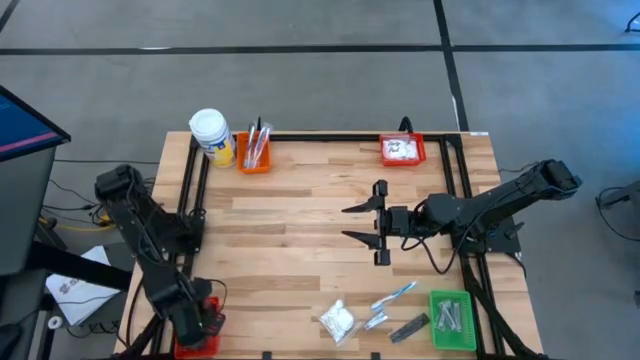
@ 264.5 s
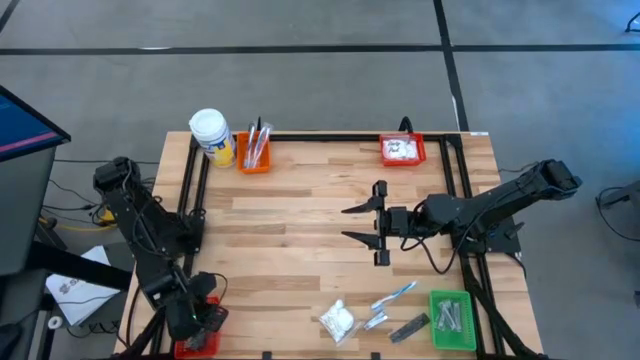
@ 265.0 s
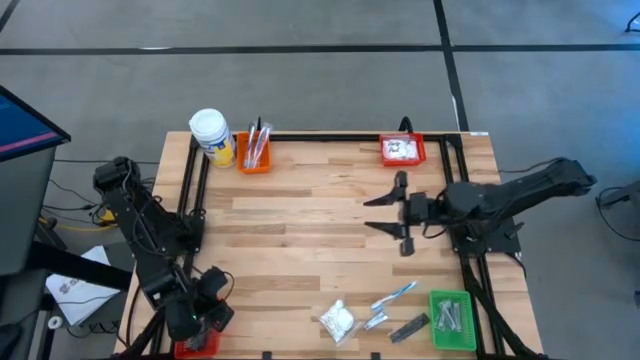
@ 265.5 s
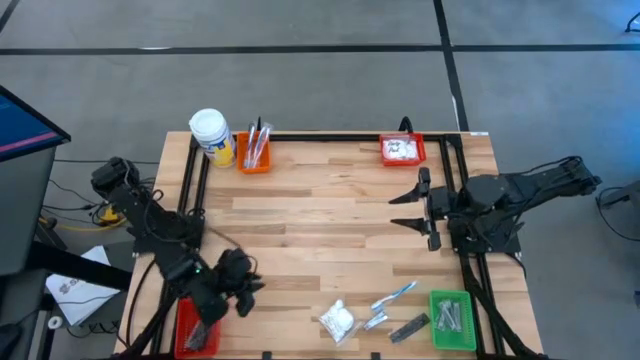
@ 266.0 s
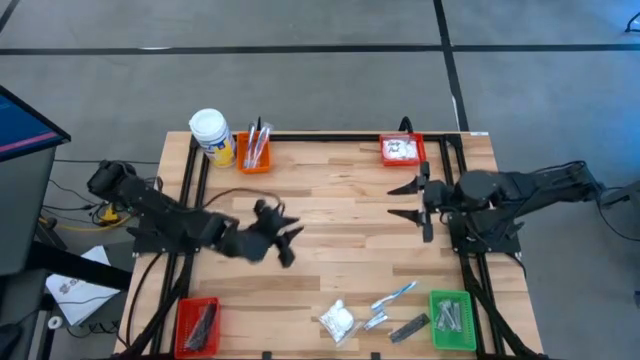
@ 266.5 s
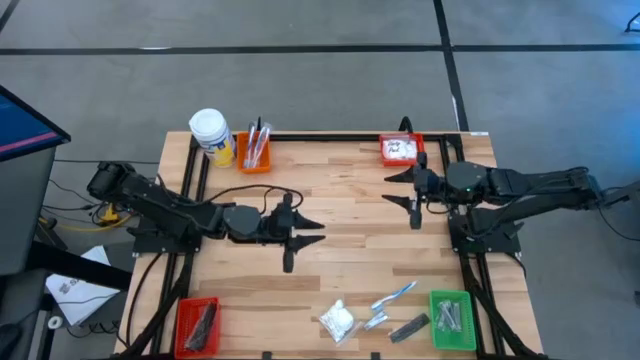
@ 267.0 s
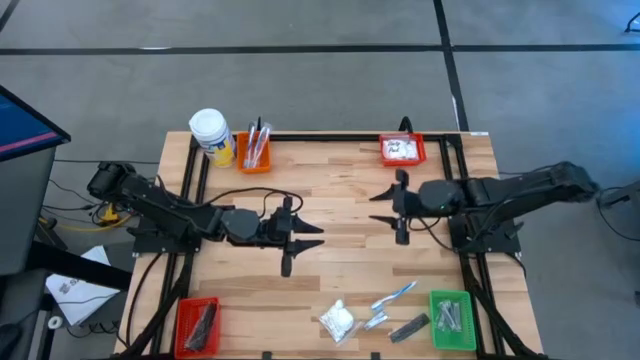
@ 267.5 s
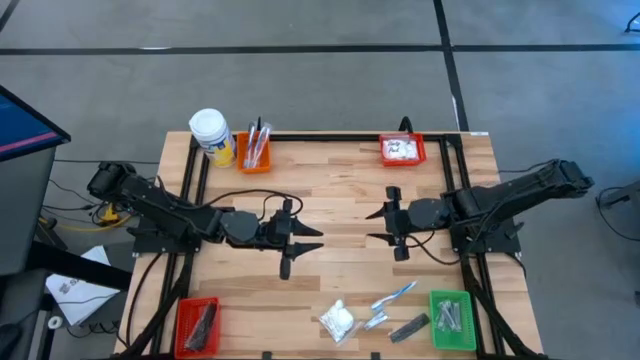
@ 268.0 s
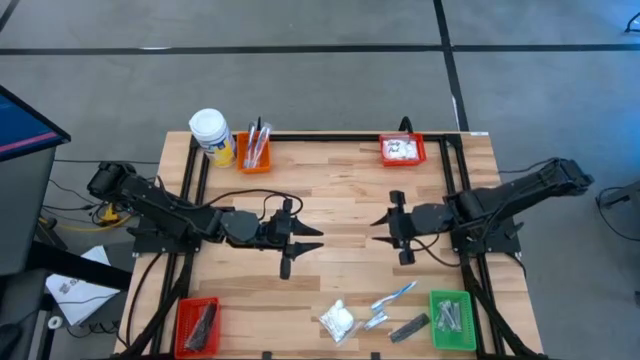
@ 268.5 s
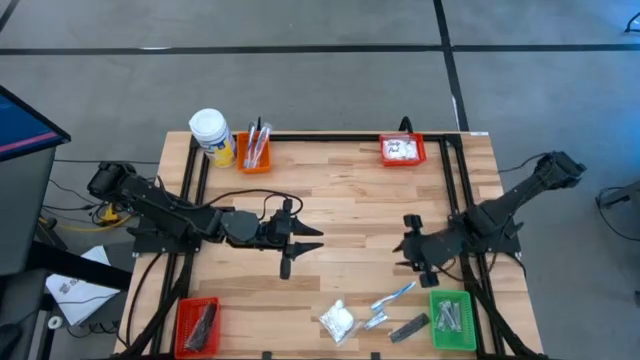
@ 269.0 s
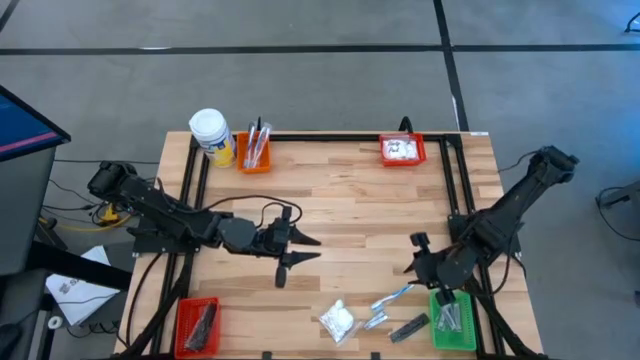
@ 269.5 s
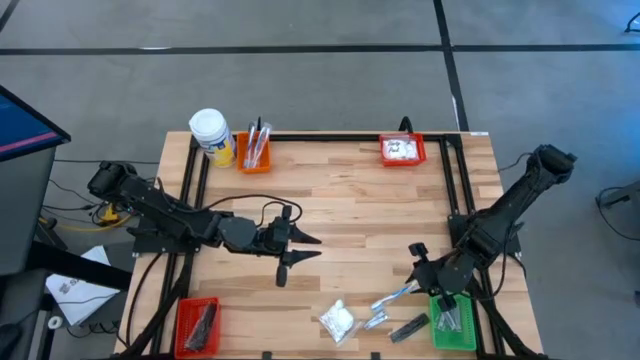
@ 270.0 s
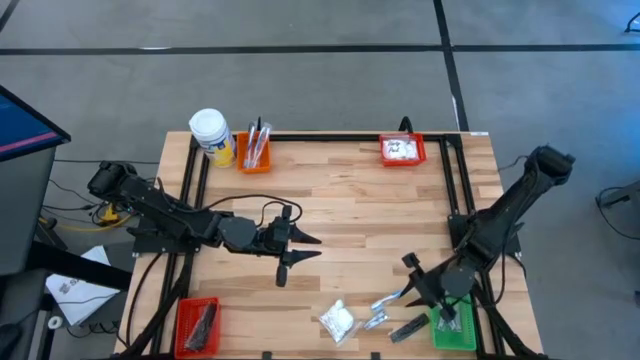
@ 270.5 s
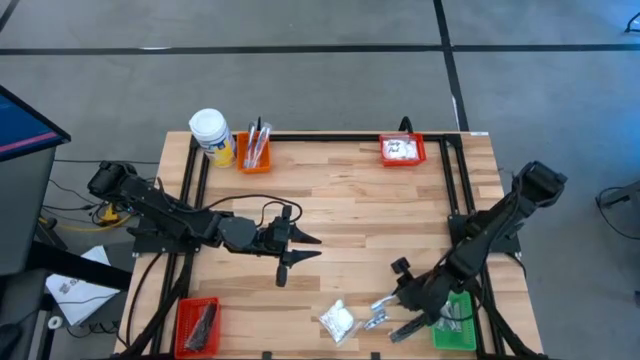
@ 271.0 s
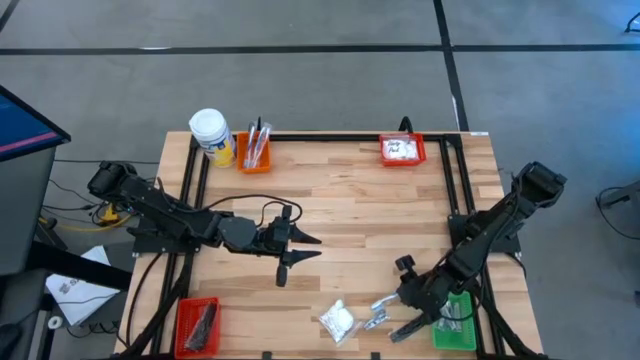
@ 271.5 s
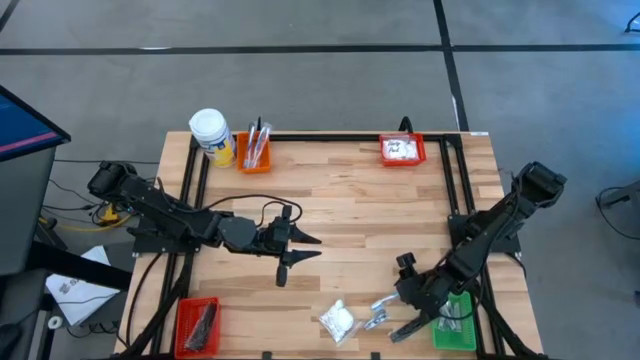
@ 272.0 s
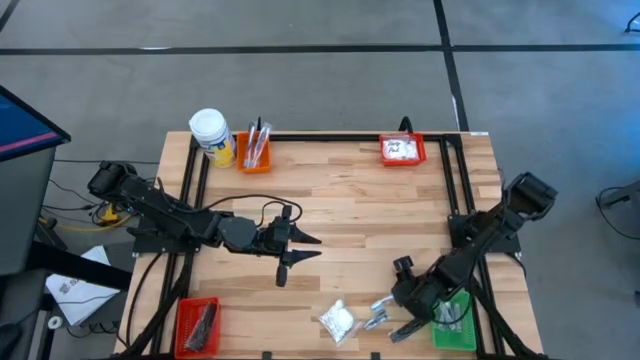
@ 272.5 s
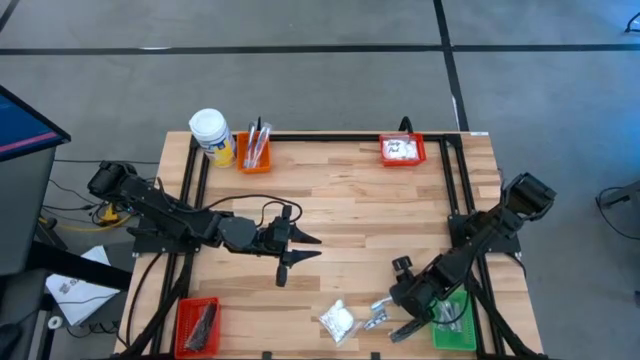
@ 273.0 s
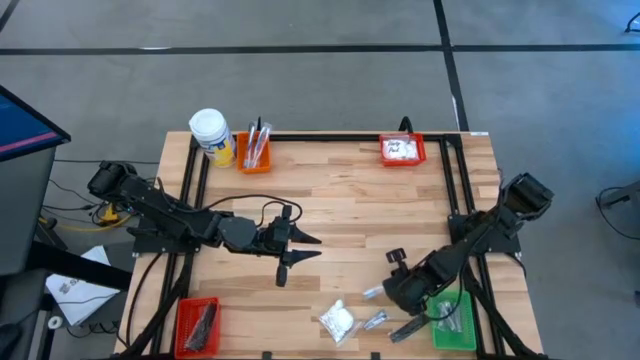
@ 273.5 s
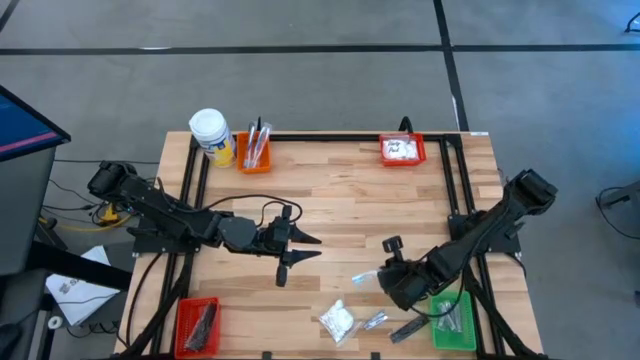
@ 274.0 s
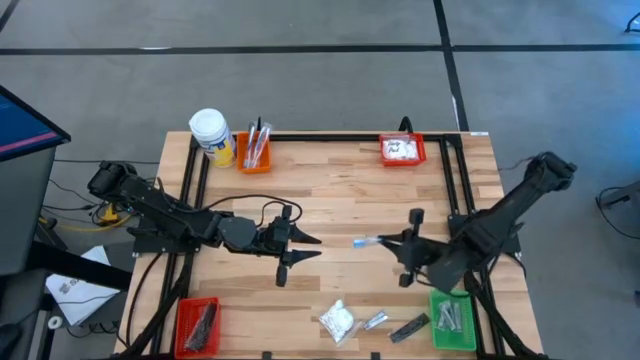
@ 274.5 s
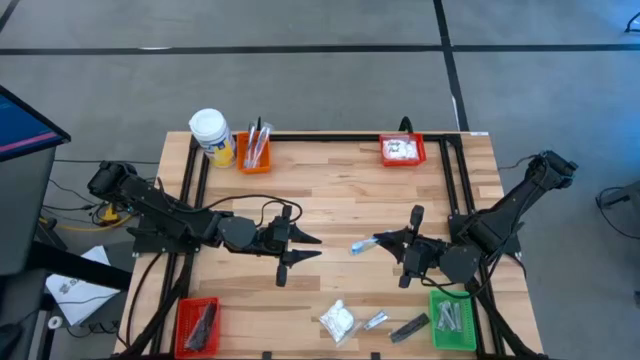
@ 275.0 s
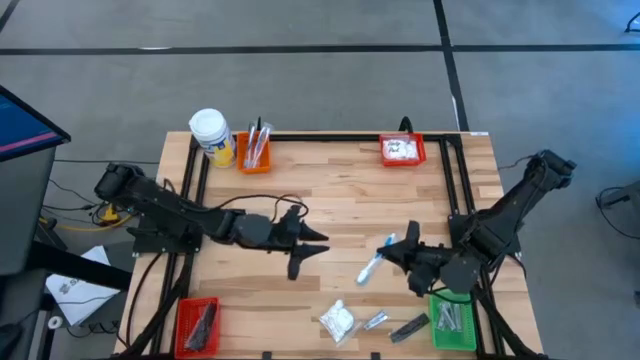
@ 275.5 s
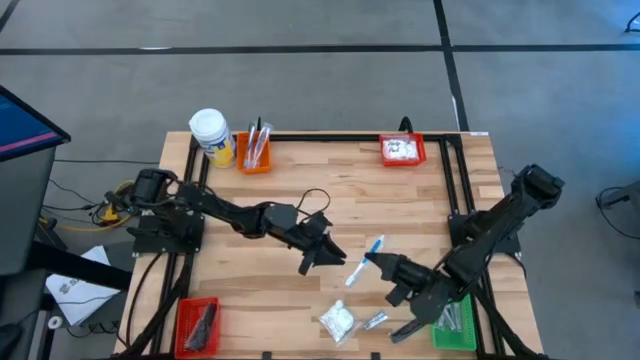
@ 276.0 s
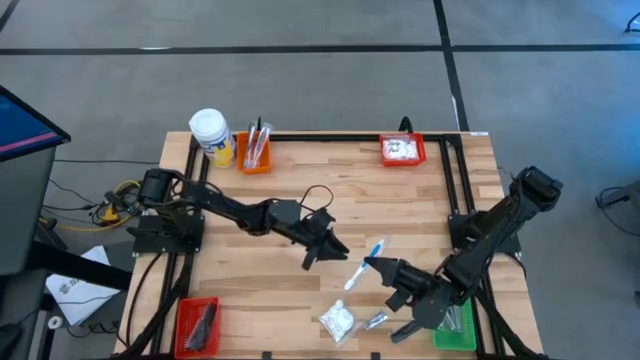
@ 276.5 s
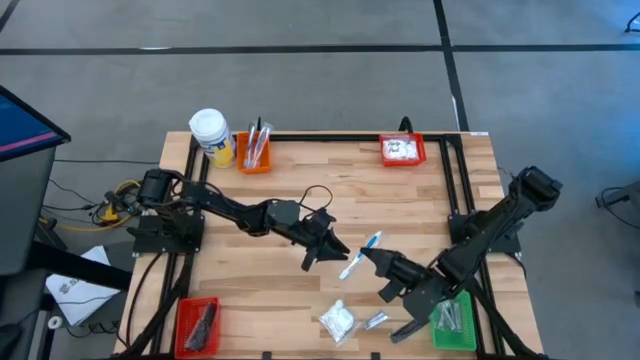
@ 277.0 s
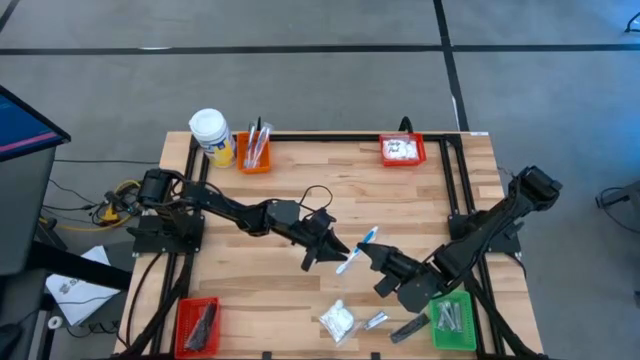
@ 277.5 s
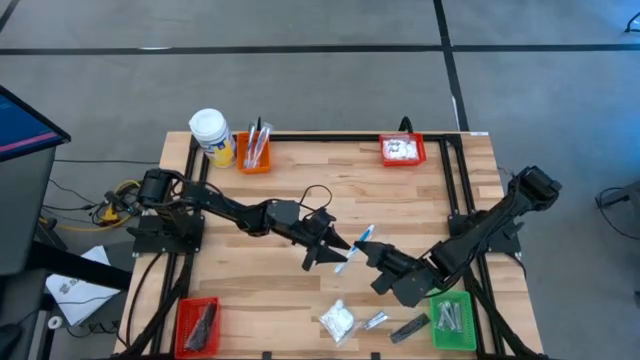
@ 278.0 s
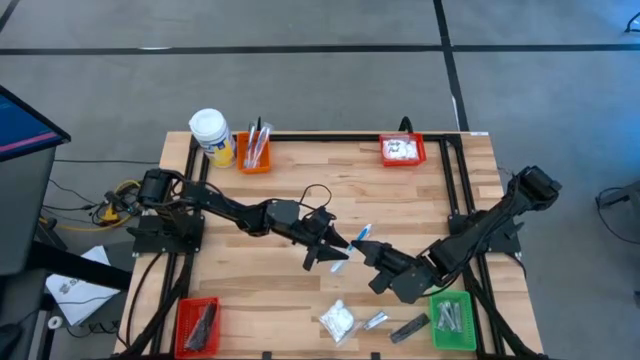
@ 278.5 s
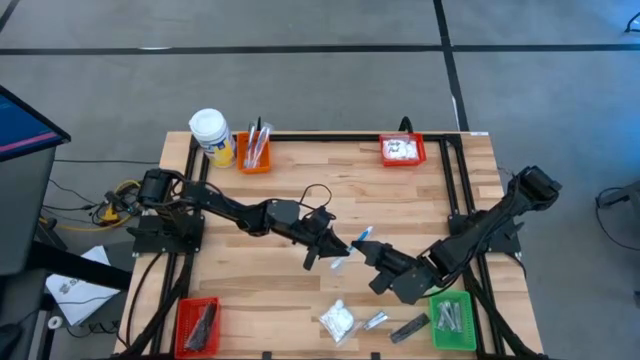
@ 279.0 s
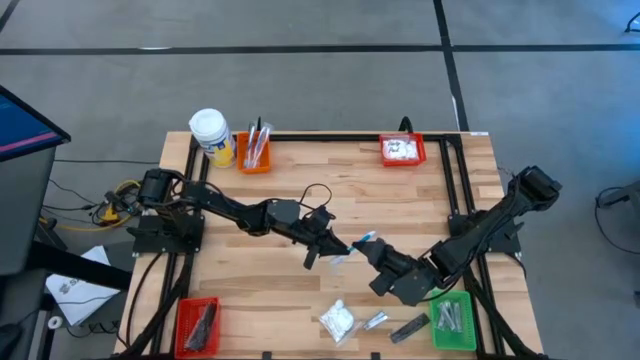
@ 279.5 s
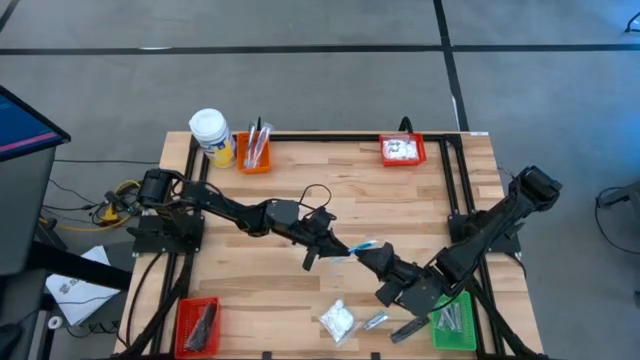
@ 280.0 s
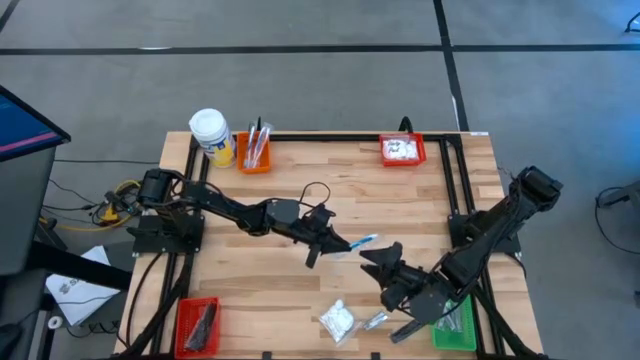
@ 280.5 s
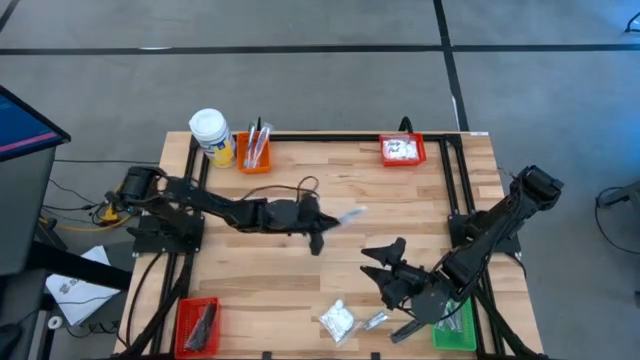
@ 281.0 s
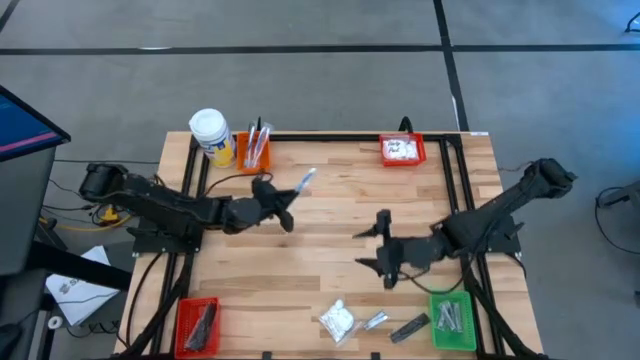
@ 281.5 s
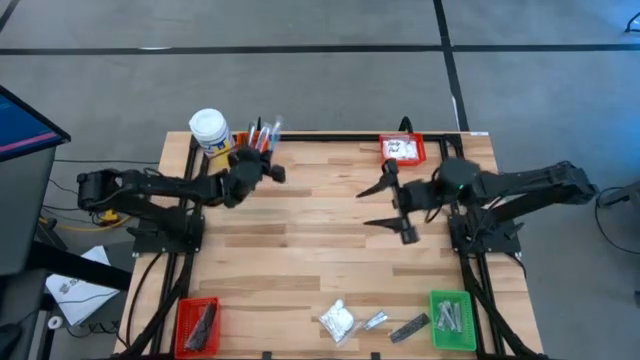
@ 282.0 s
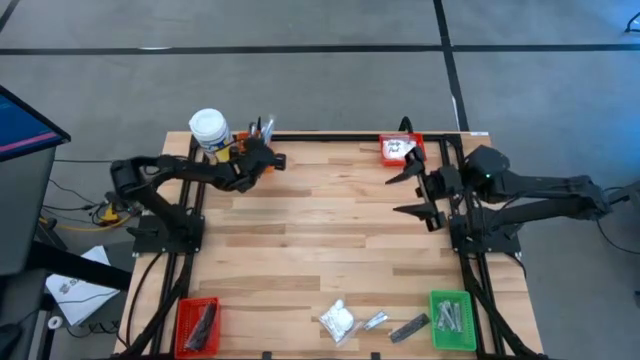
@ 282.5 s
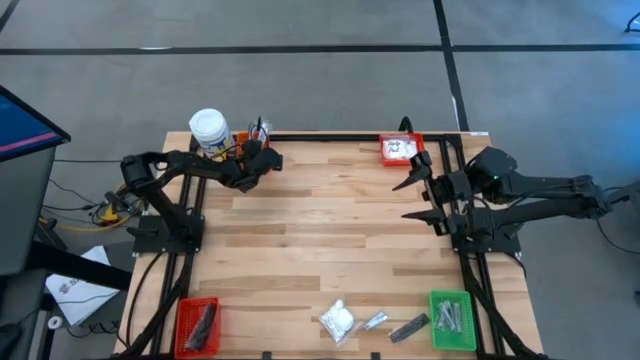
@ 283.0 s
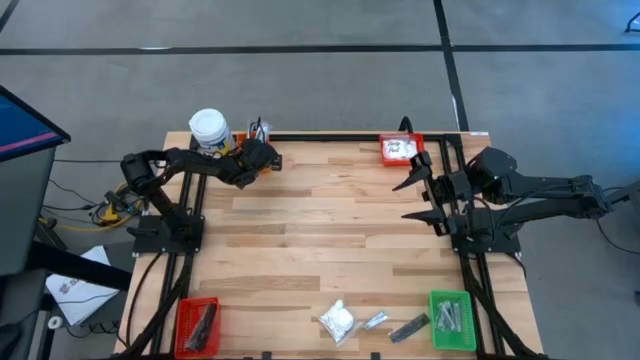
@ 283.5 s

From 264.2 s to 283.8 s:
Task: Pick & Place Travel size toiletries
Put the blue toothbrush into the orange bin

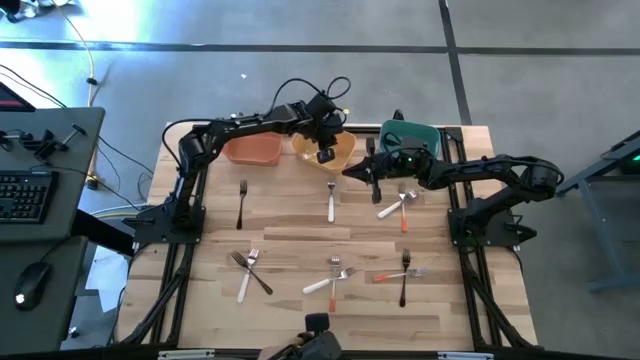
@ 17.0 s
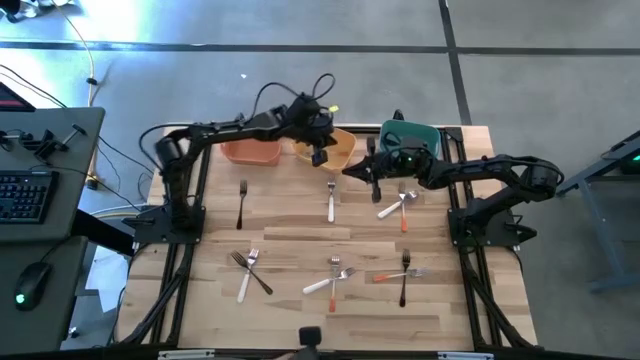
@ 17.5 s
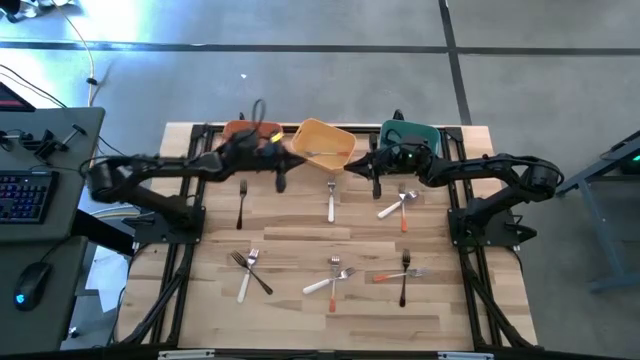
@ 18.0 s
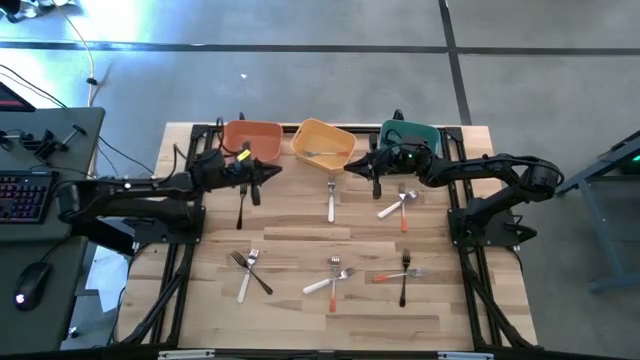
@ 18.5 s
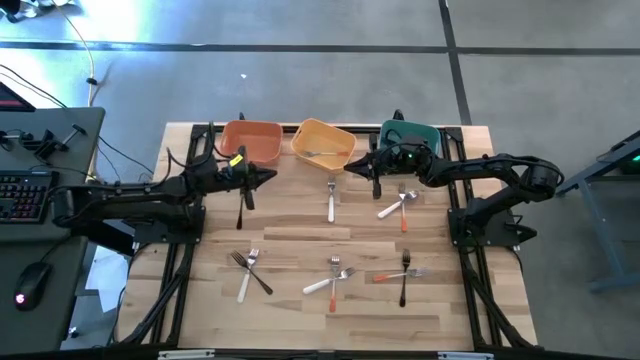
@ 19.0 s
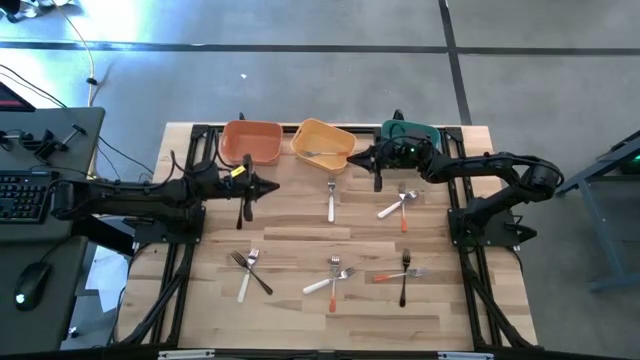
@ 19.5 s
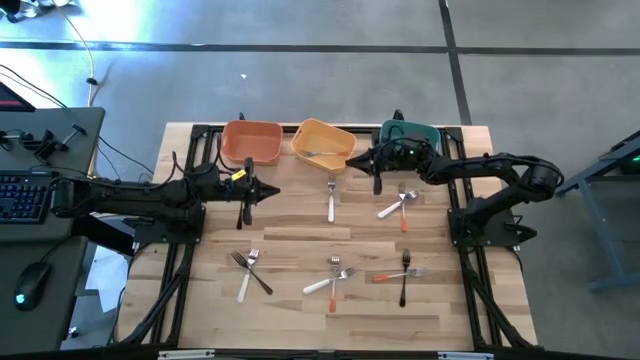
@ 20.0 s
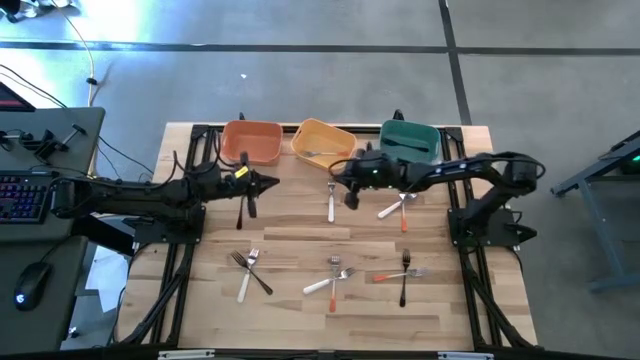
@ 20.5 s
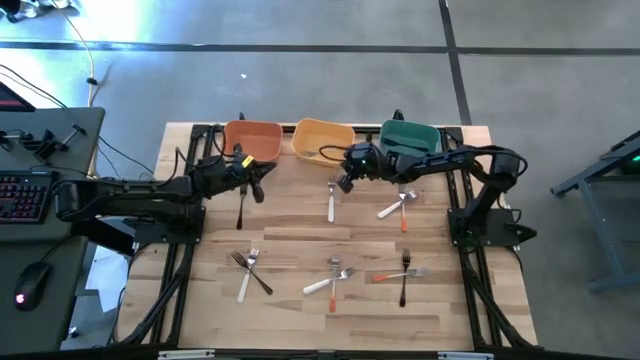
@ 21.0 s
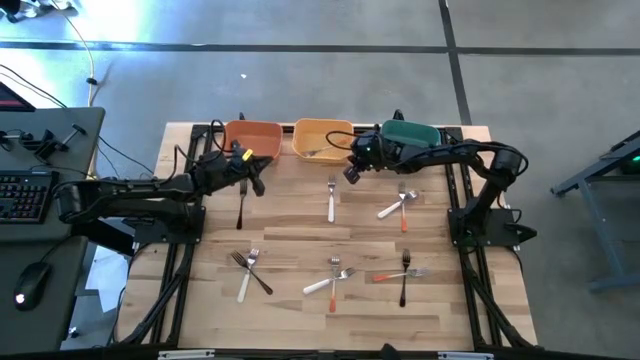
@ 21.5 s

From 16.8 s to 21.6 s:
Task: Sort silverware by color (type)
Adjust the yellow bin
